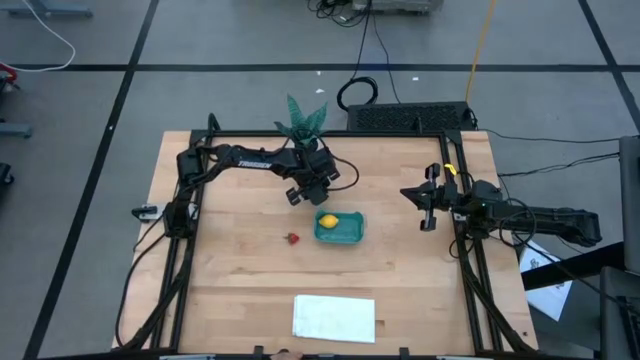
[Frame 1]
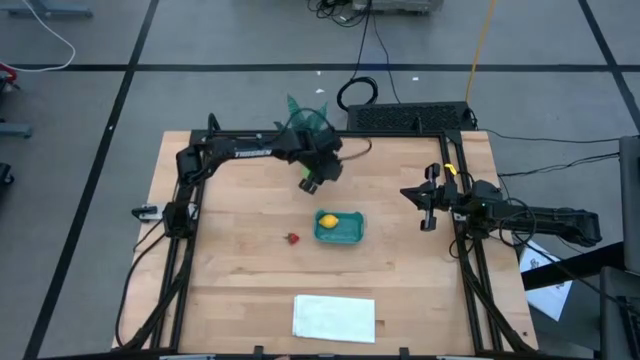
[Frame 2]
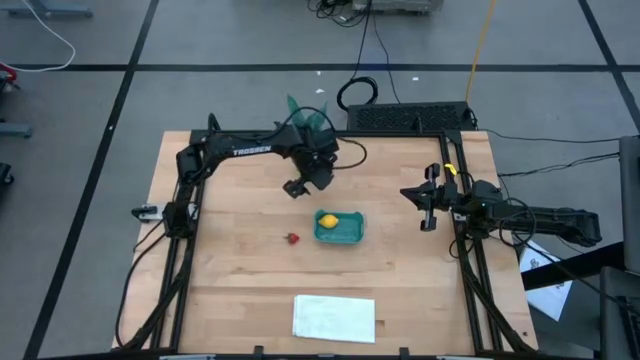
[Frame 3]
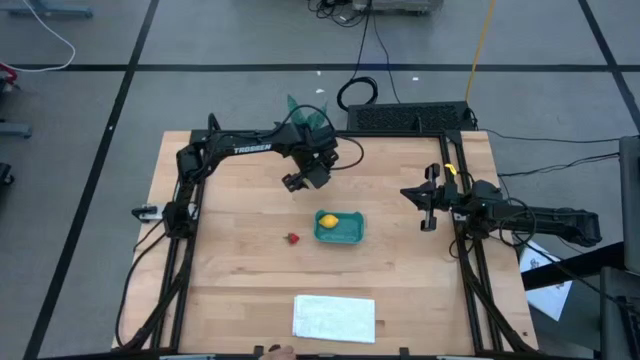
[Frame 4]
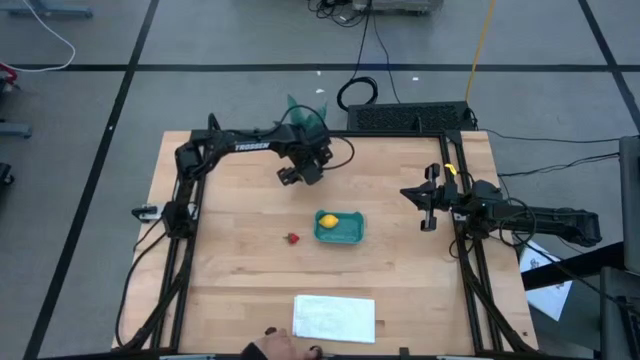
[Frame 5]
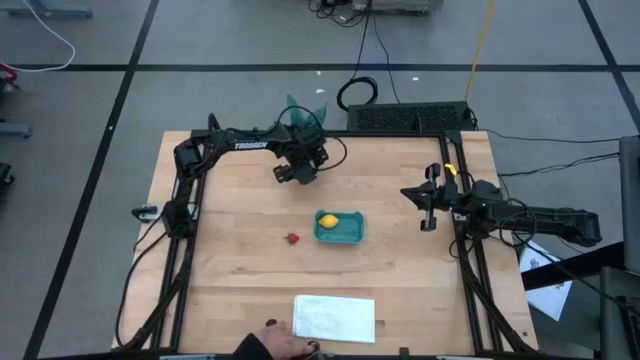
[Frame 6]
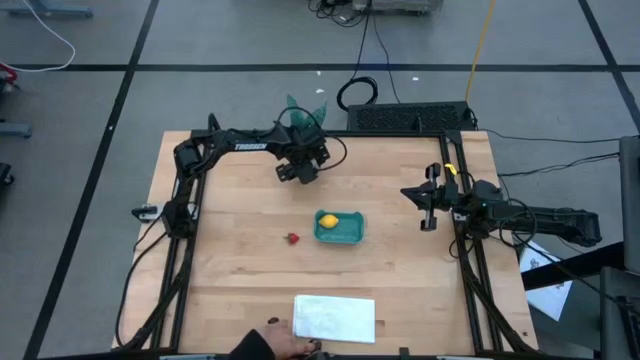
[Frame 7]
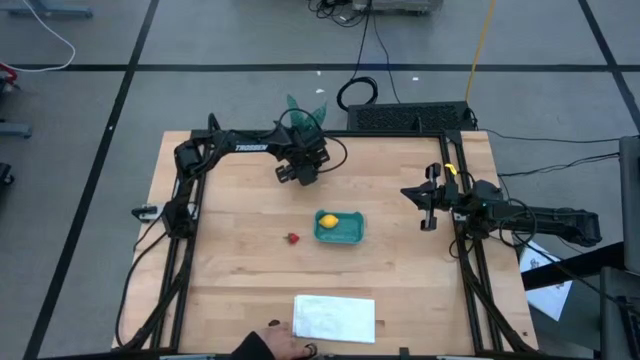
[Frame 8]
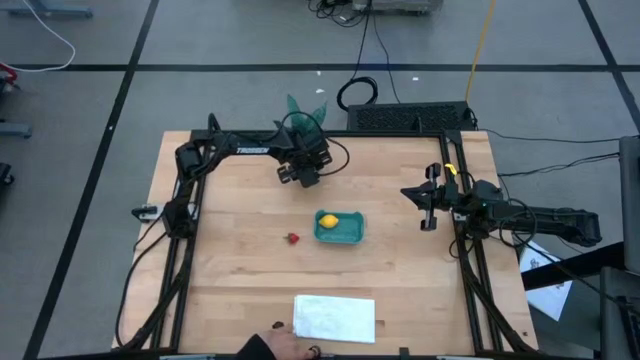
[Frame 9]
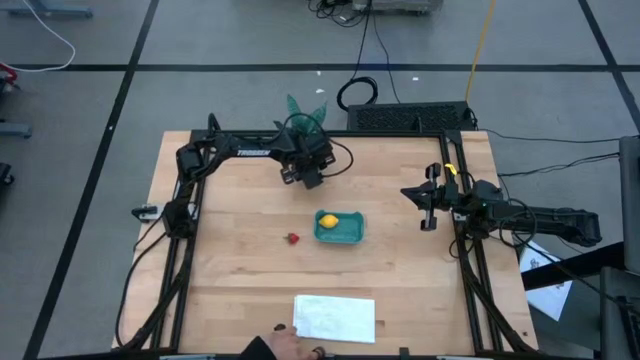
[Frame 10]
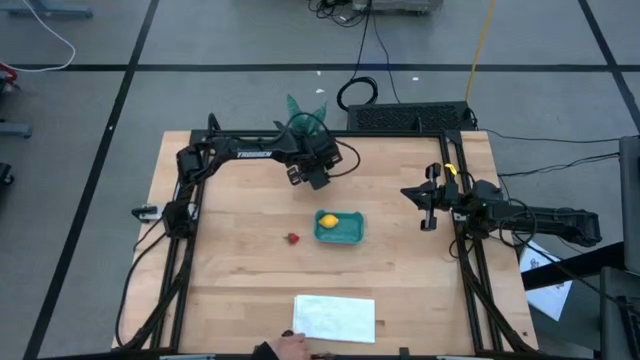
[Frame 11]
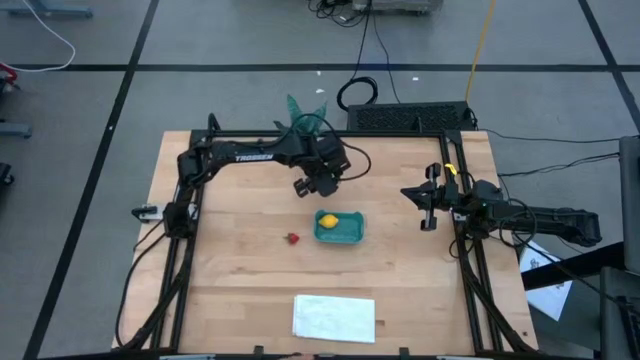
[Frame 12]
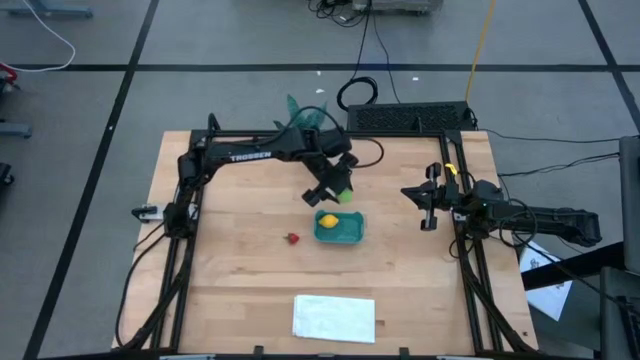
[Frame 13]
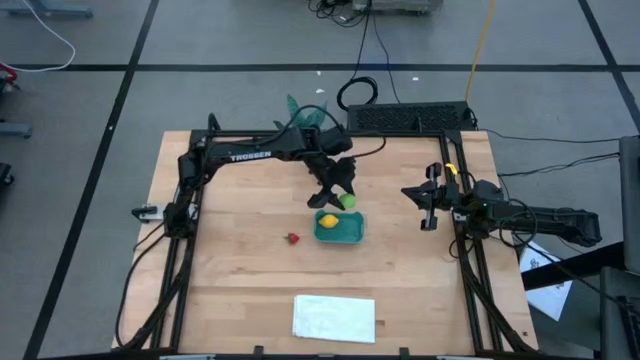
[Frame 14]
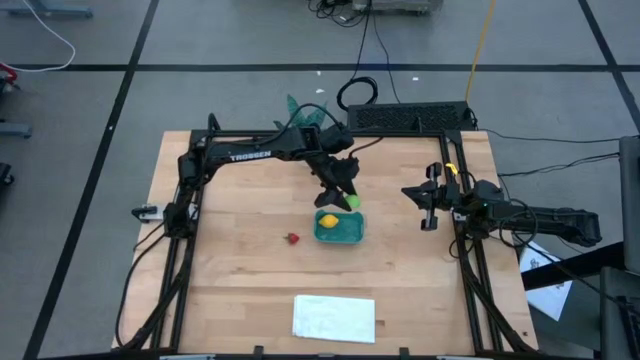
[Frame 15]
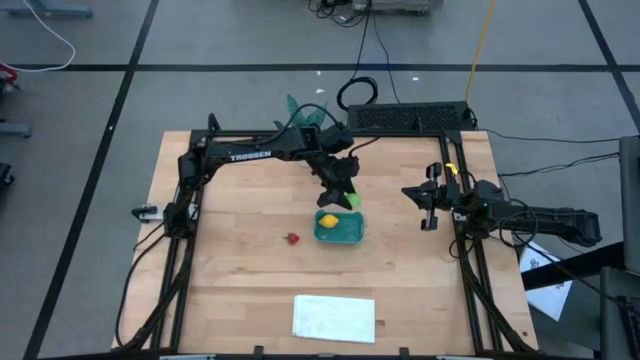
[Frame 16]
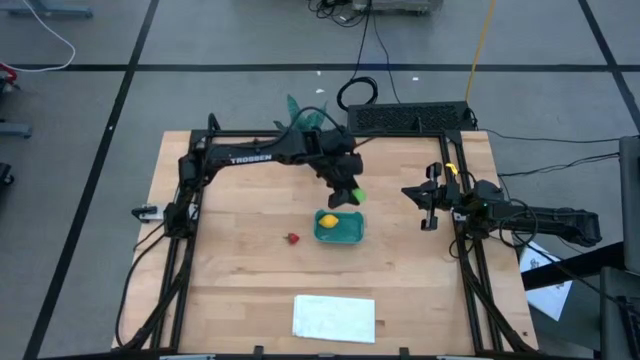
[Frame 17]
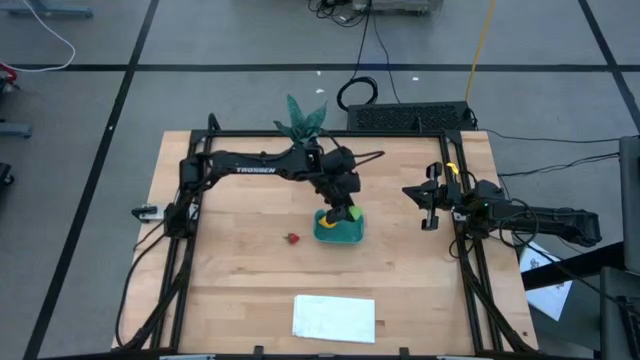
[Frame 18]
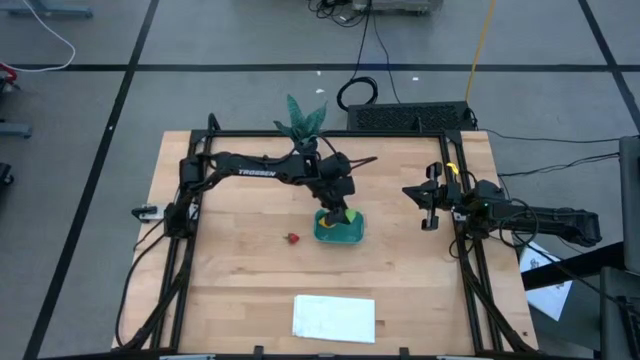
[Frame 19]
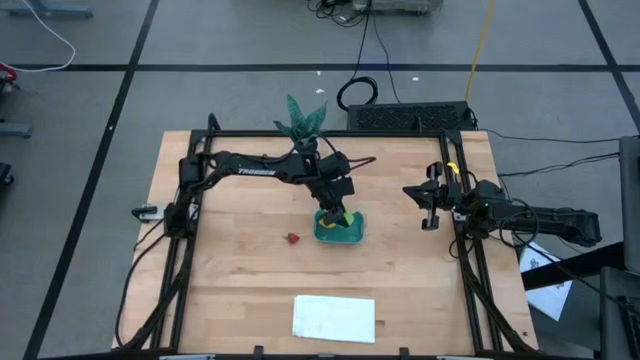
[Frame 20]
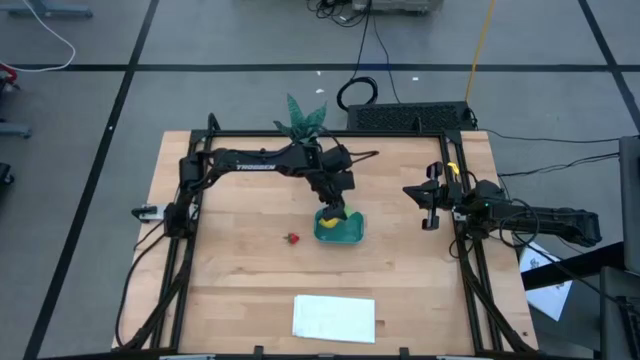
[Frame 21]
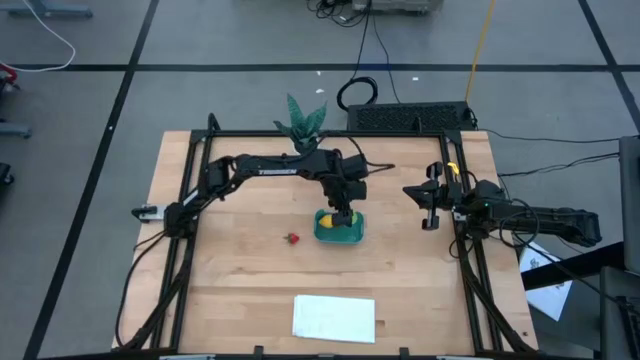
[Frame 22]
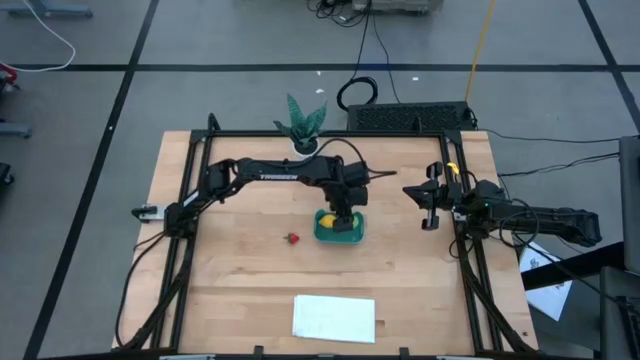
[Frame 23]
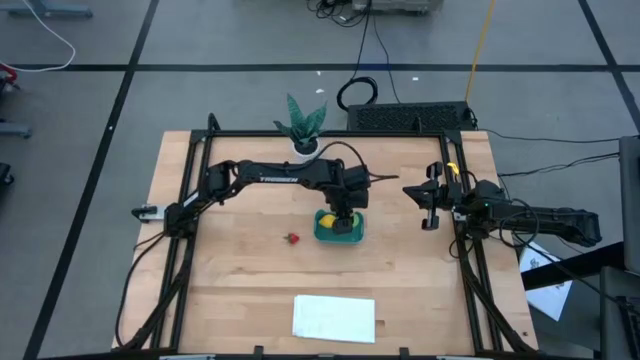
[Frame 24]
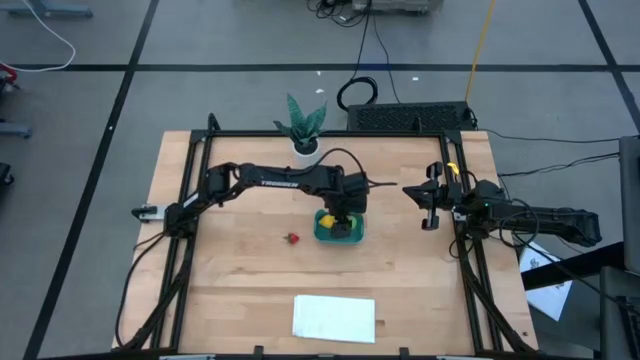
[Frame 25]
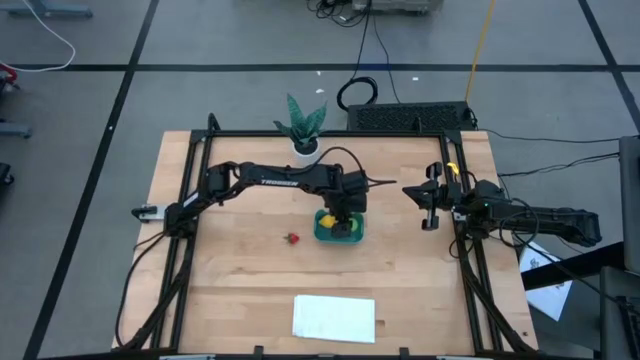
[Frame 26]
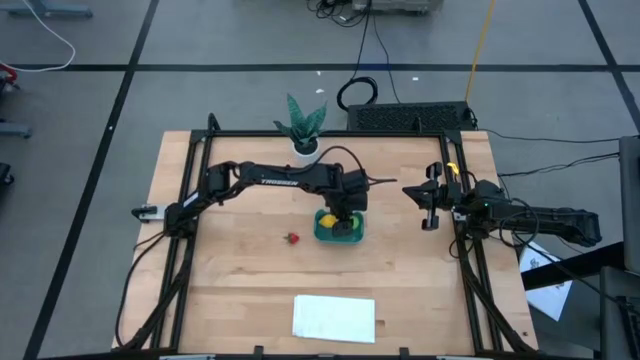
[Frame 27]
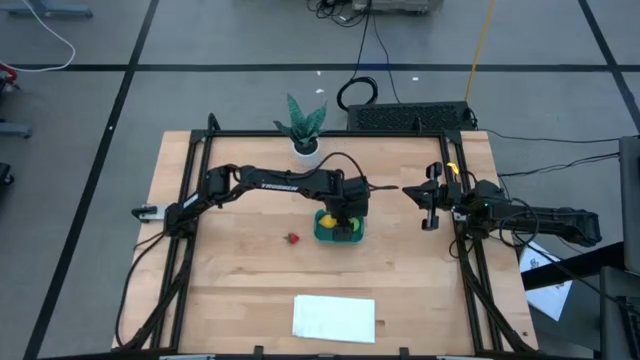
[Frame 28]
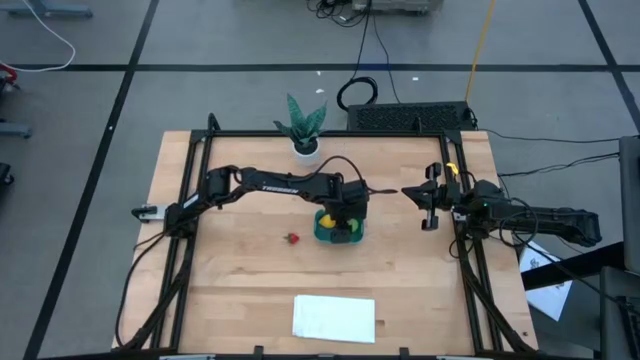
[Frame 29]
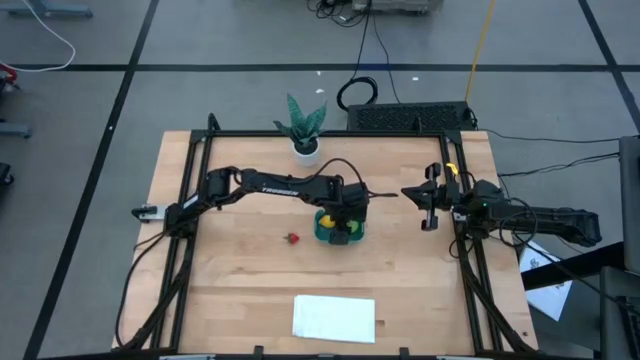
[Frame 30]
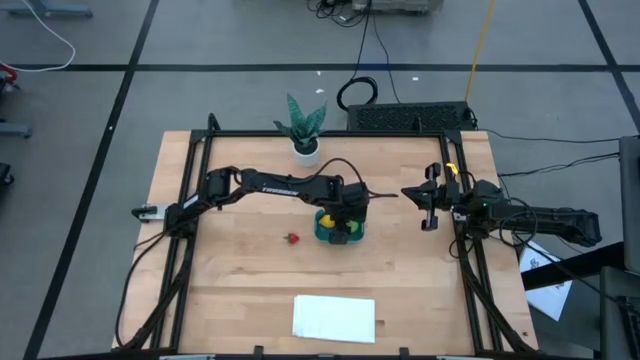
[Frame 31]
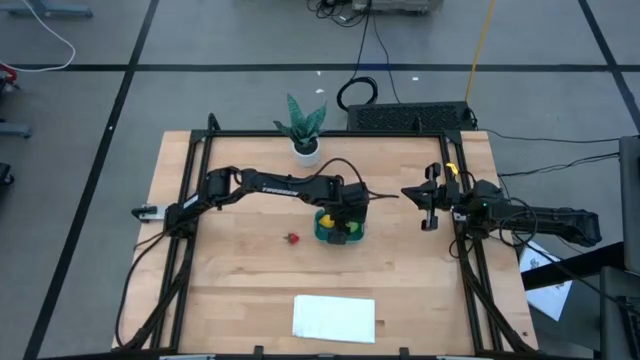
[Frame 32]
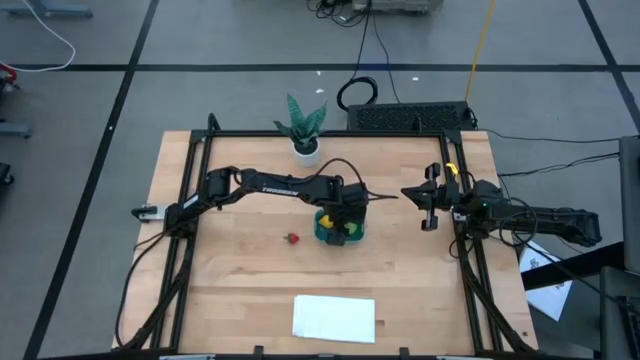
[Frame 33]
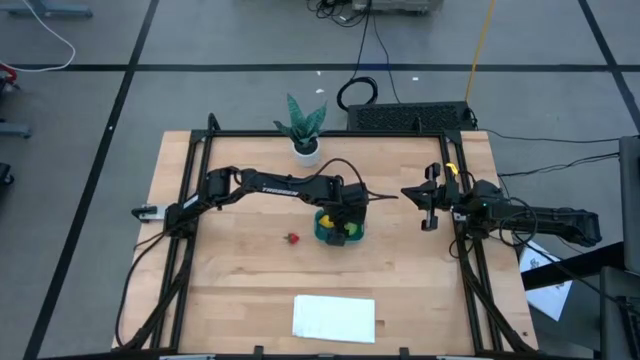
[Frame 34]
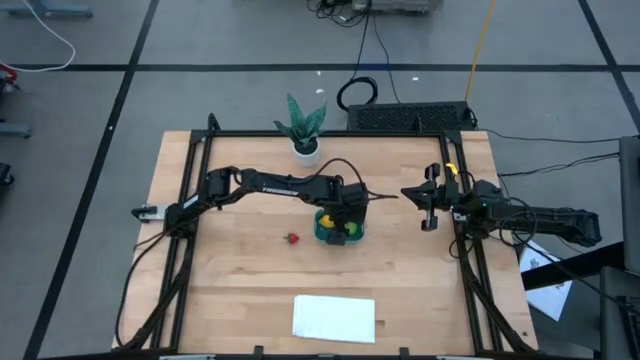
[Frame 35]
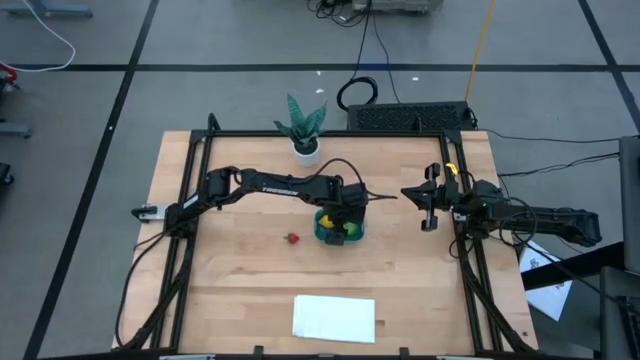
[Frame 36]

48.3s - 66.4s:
Task: Pick and placing Produce into tupperware
Put the cabbage into the green bin

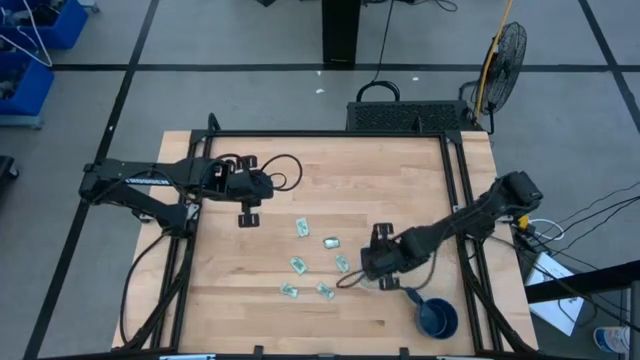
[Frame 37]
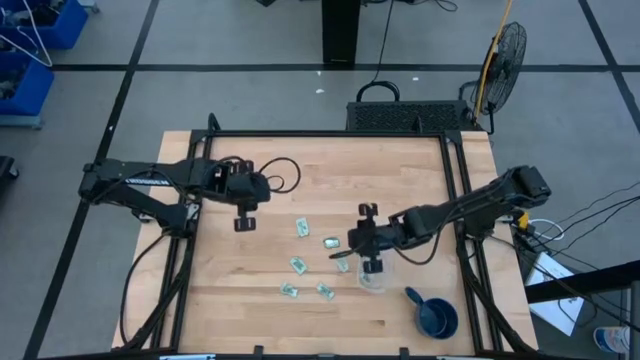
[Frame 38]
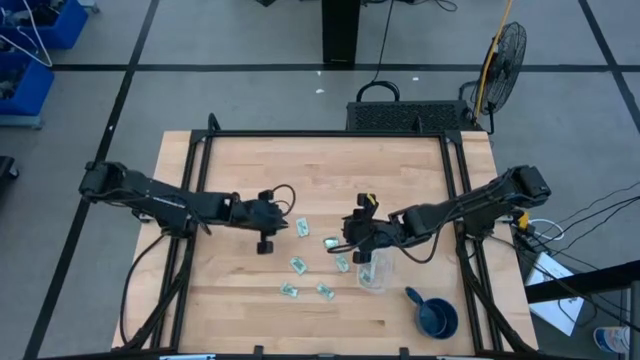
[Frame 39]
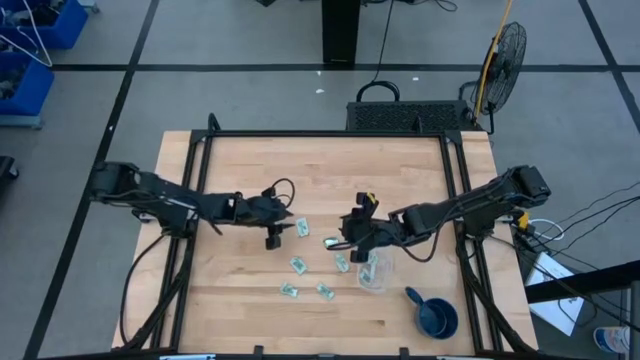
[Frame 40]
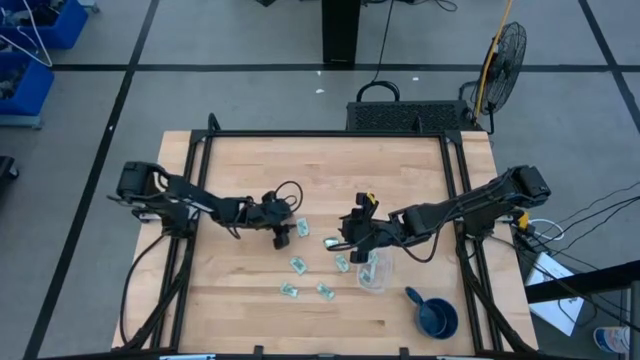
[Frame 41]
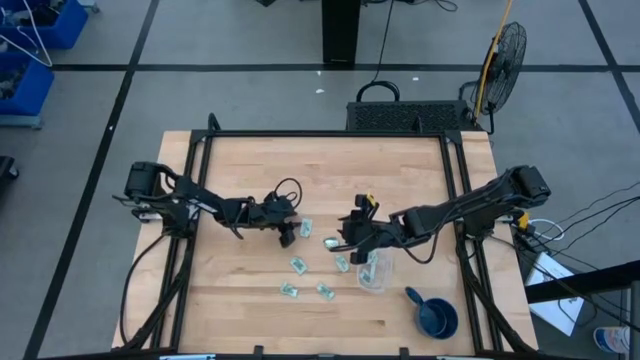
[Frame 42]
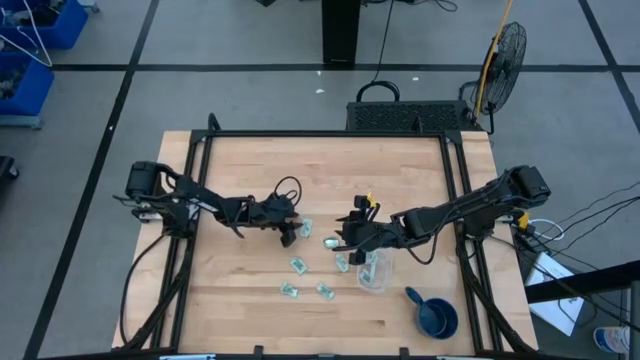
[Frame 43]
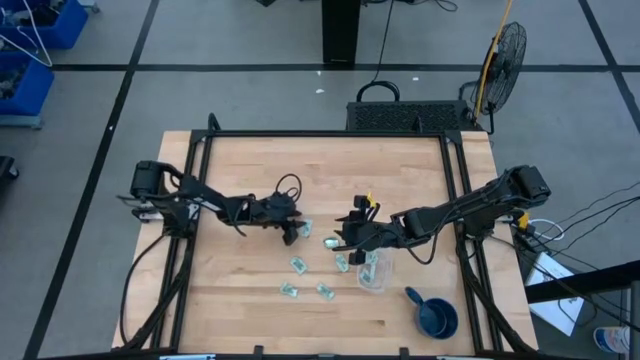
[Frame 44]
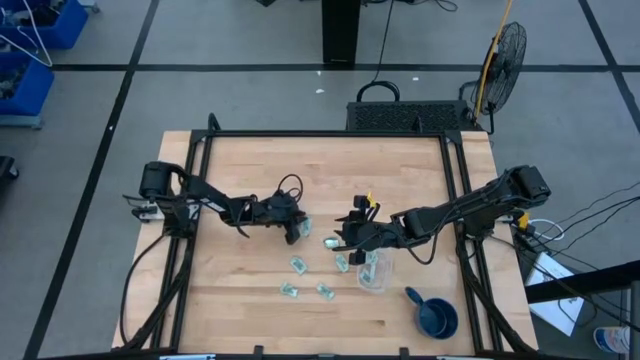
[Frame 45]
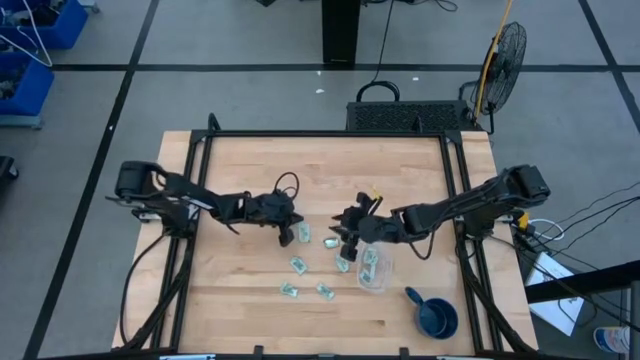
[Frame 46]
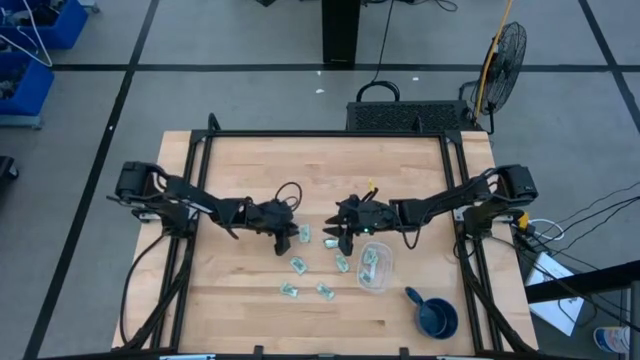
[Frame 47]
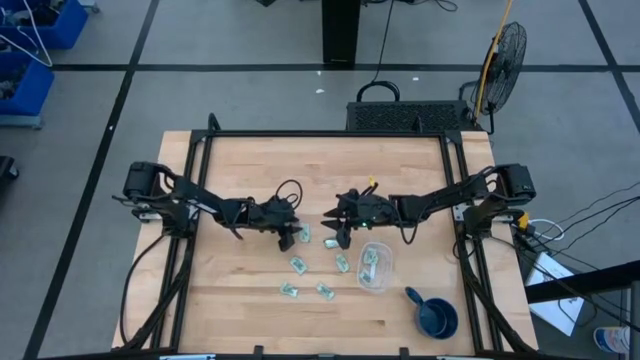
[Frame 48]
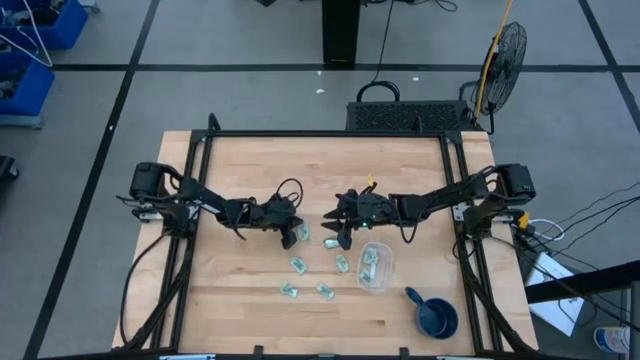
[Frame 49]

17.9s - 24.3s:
Task: Pick and place Stevia / Truvia into bins
Put the stevia packet into the transparent container
